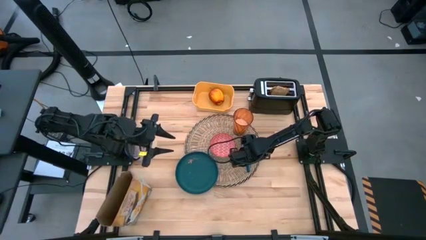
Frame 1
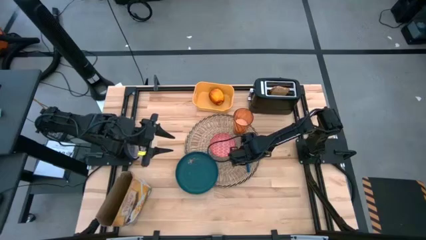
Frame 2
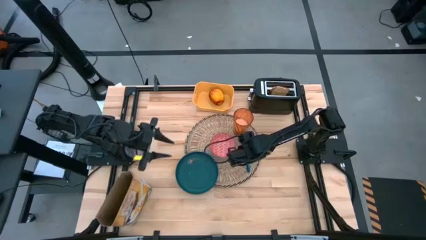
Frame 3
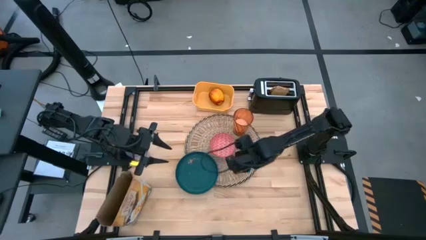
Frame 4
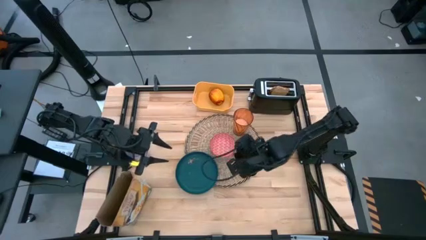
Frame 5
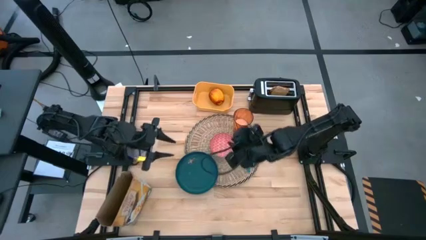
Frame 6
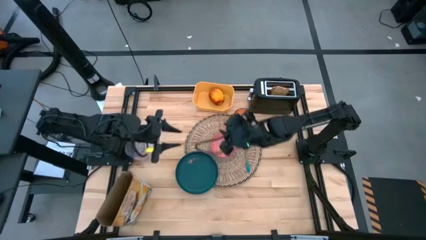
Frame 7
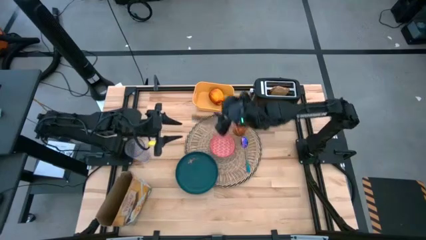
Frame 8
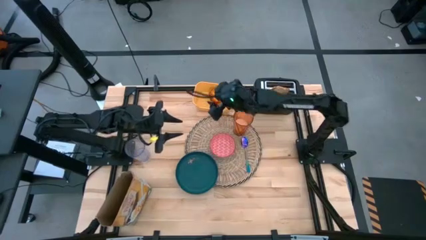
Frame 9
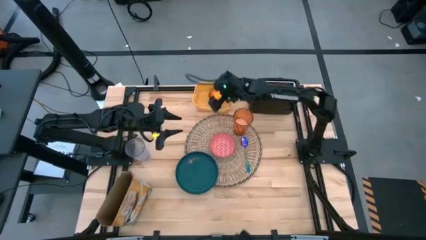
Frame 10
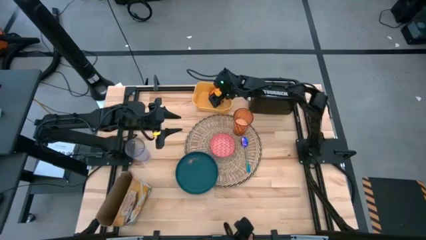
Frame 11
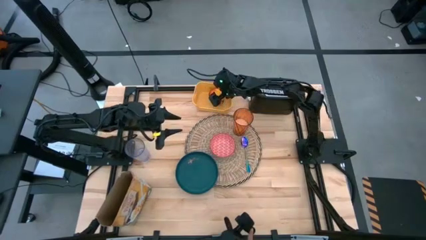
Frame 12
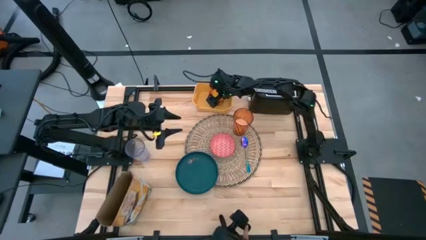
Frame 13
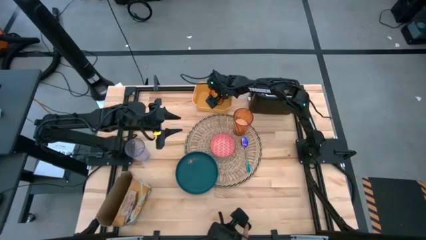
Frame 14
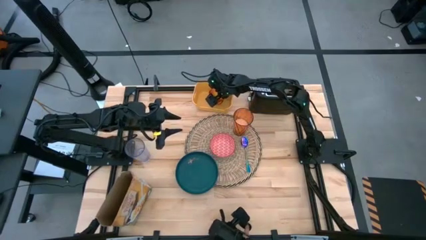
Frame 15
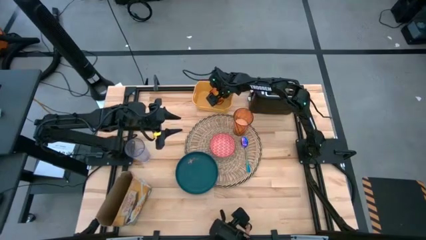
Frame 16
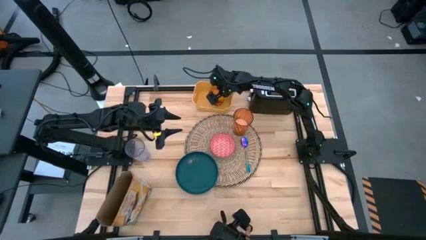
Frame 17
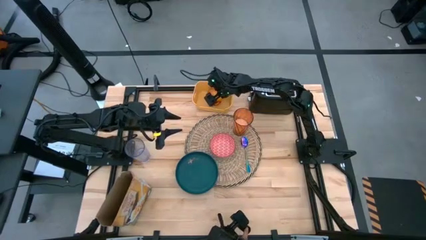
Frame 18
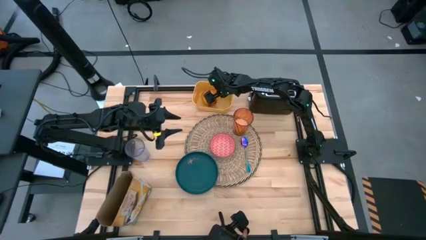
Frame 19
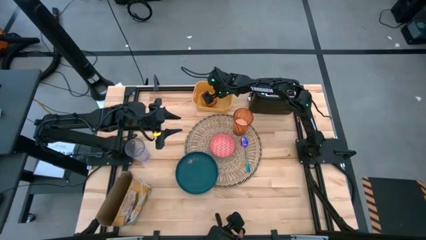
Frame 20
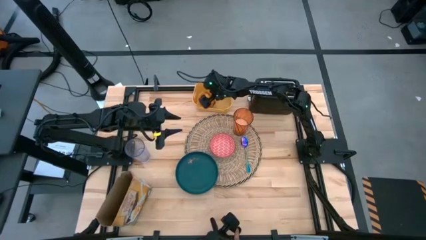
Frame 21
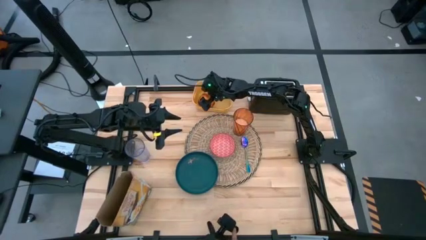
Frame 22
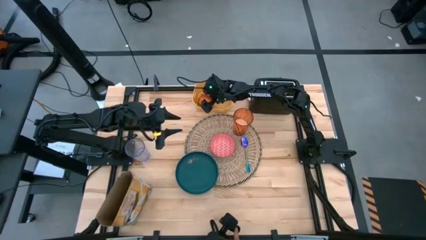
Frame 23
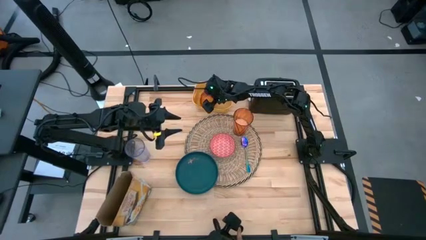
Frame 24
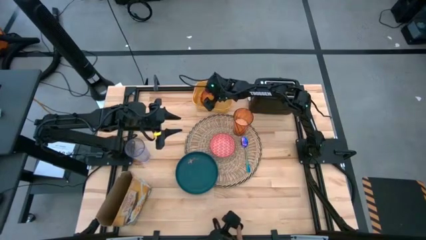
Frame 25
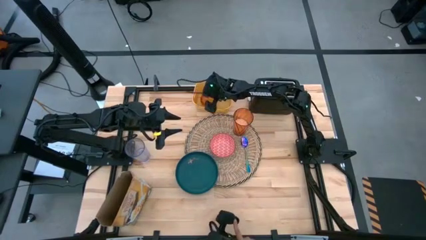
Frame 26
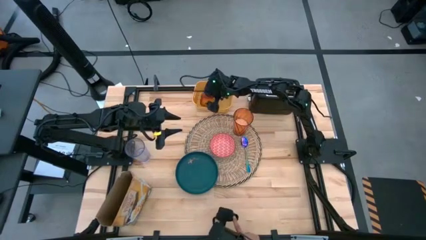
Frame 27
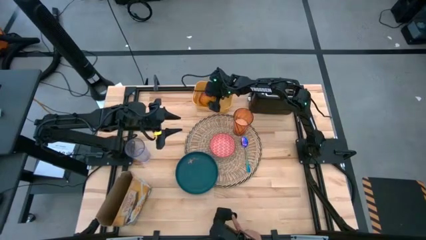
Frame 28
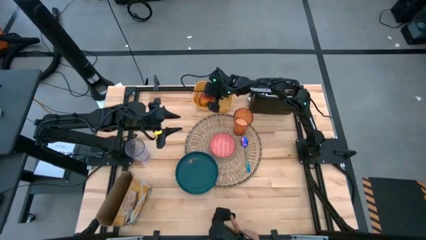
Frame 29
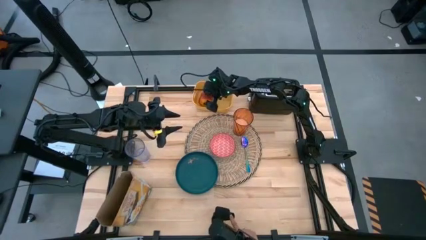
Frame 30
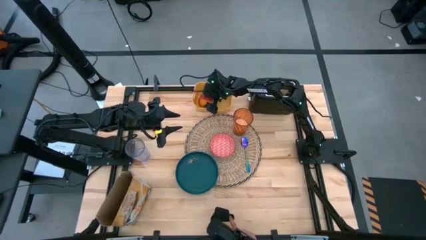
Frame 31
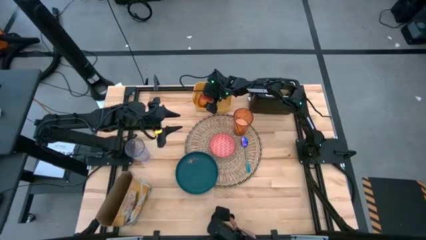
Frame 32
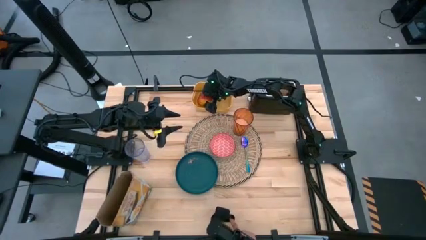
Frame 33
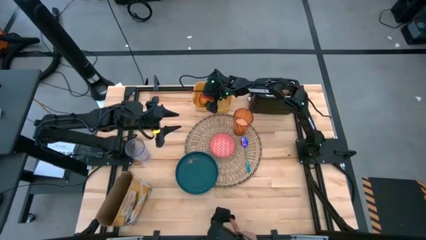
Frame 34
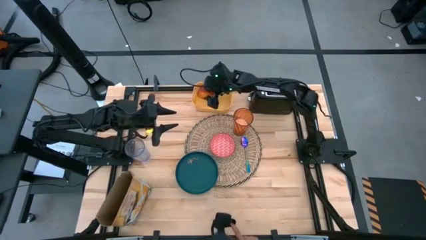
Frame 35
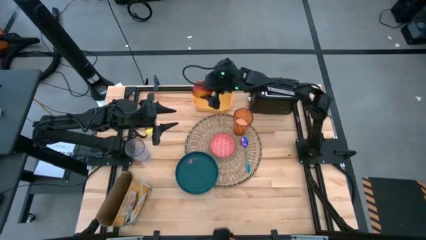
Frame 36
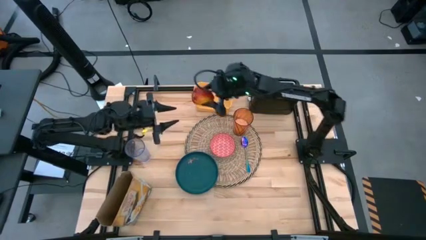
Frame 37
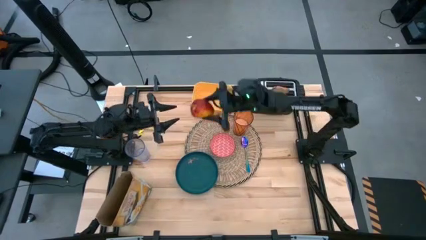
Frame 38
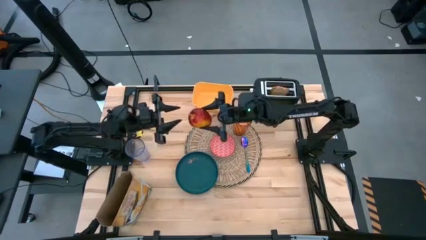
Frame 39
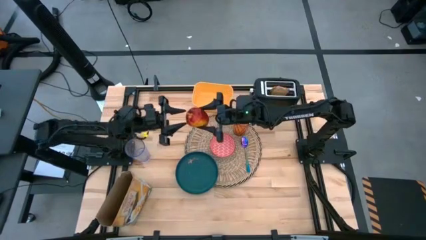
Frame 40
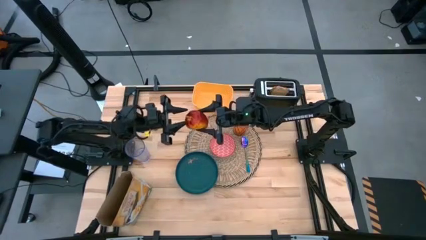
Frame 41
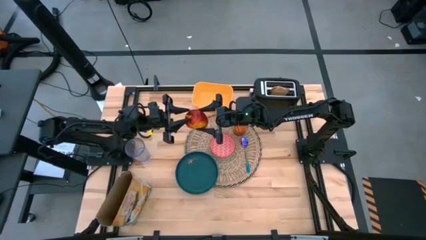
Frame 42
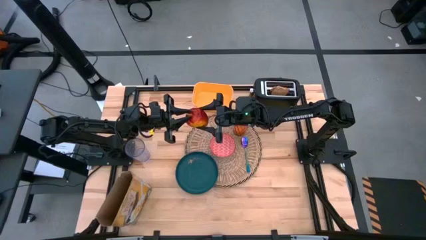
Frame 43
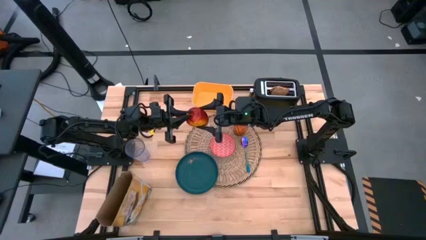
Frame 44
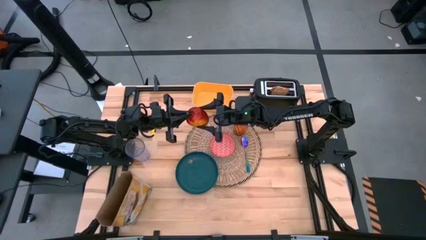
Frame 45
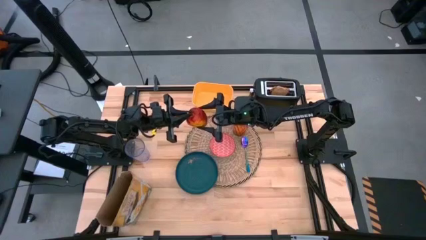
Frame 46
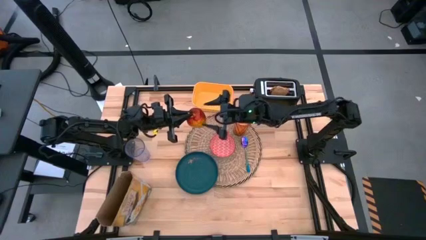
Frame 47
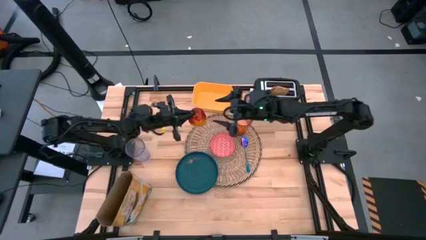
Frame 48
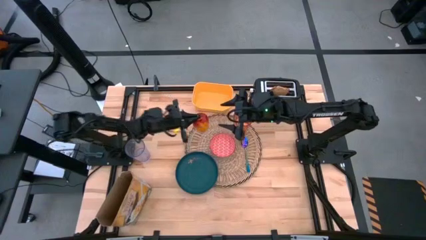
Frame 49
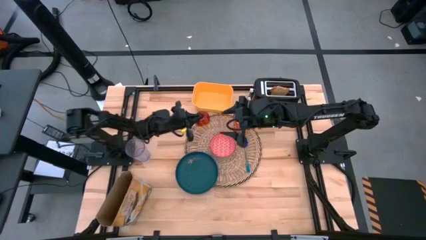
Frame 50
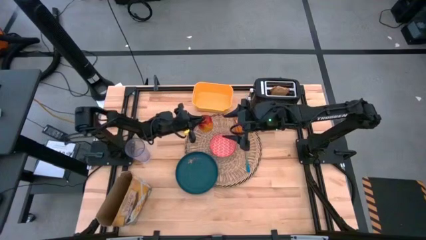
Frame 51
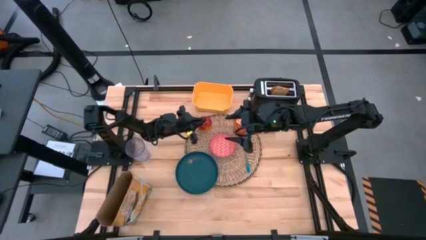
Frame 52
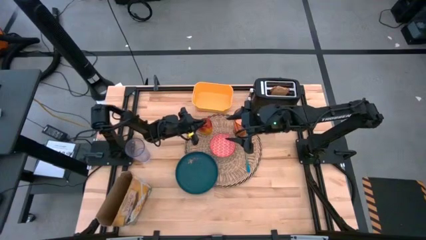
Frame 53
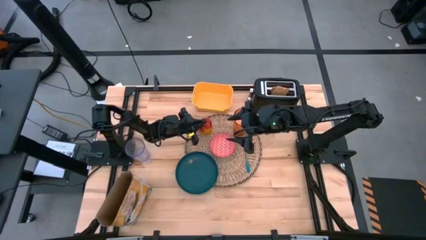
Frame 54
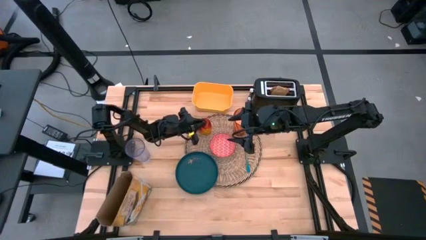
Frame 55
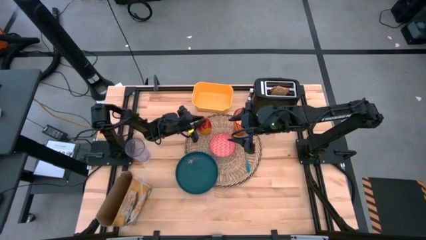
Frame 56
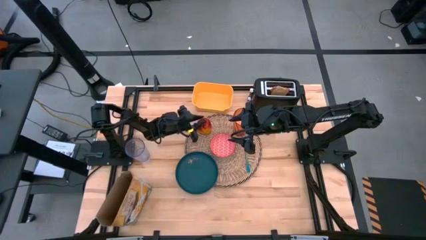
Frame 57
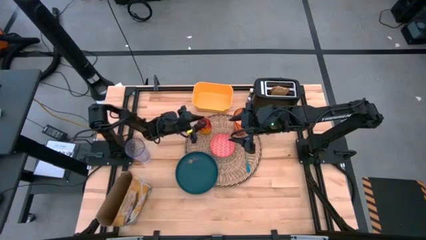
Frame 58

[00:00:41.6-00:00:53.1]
Task: Arrange a breakfast setting
Put the apple on the brown table mat to the top left of the red bowl

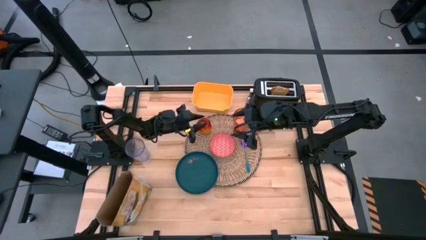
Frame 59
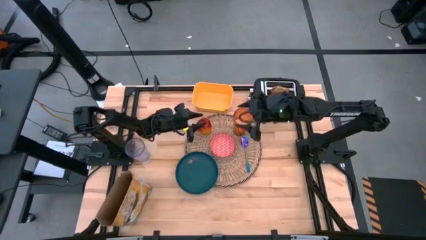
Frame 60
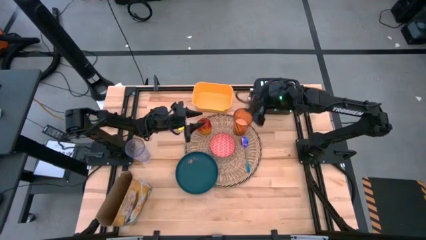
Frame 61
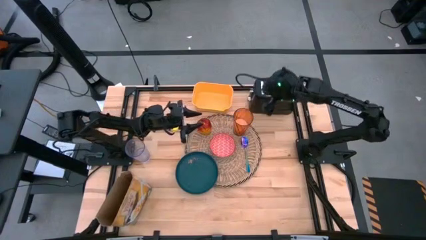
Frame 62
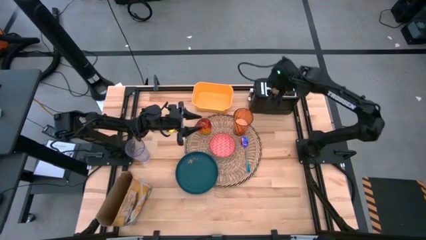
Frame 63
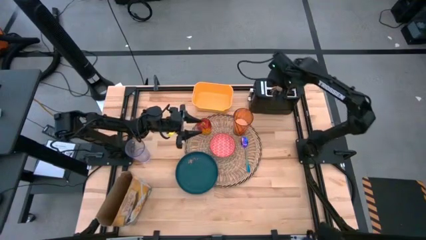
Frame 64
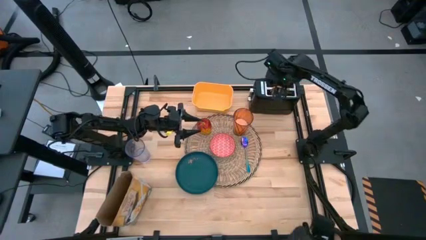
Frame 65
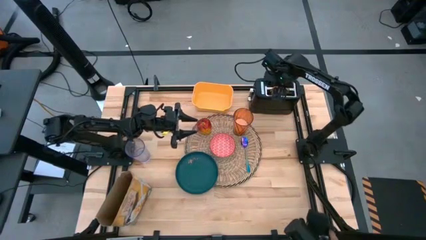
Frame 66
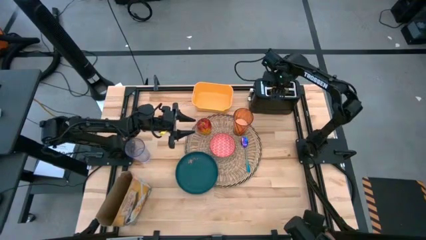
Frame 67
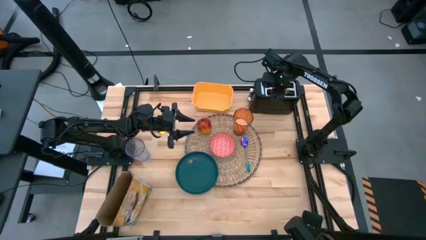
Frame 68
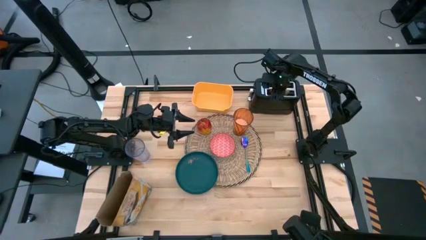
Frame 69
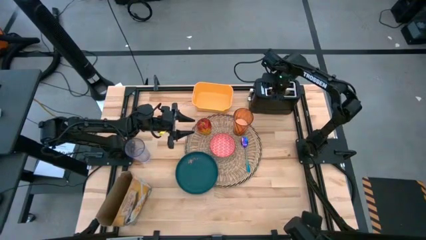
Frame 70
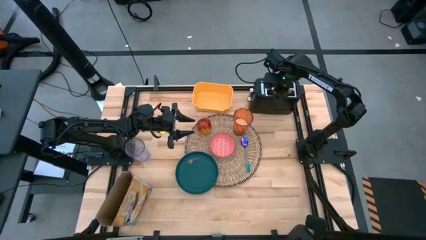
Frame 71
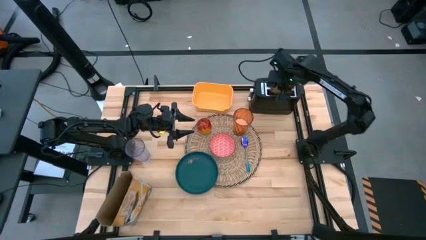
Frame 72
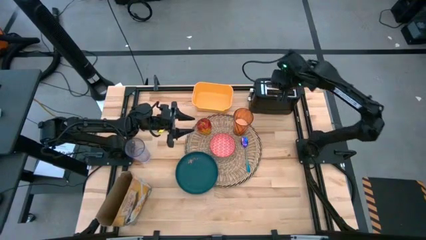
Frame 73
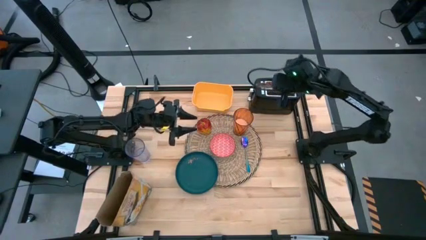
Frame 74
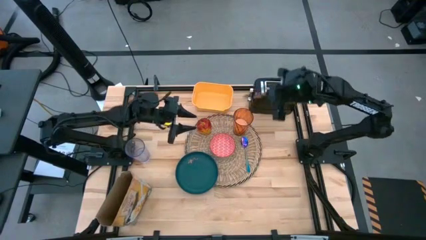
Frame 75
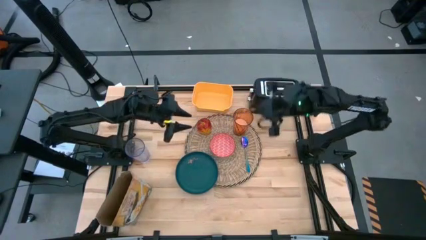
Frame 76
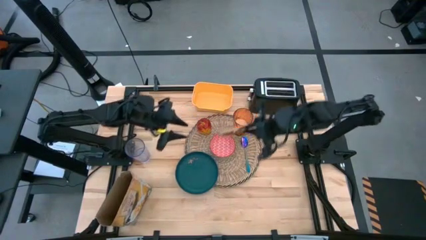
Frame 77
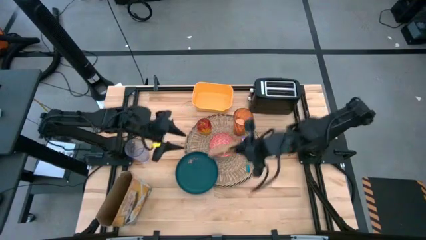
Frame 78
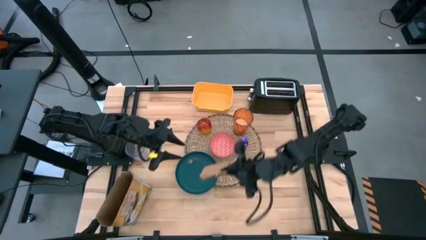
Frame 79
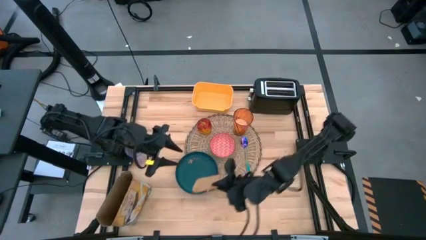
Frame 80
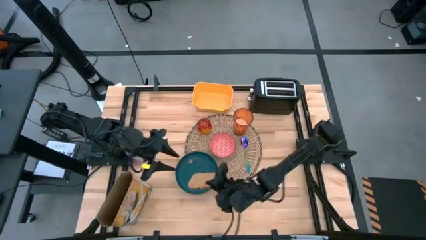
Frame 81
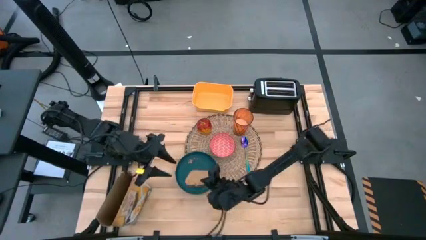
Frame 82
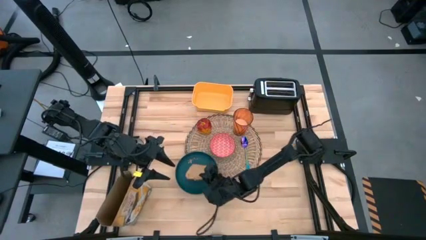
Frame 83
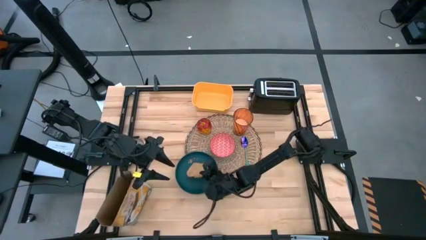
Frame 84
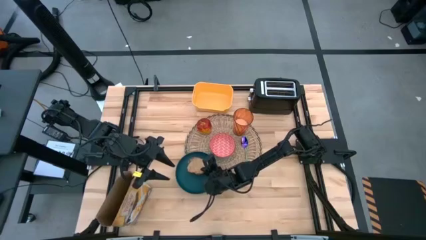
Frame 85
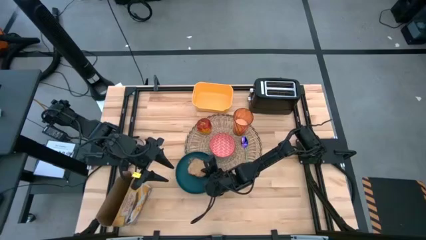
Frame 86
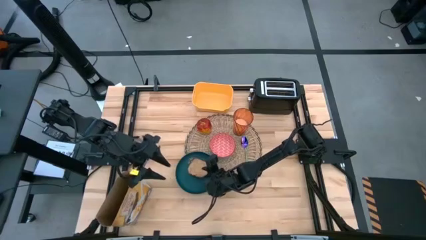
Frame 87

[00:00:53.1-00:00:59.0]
Put the toast on the dark green plate
